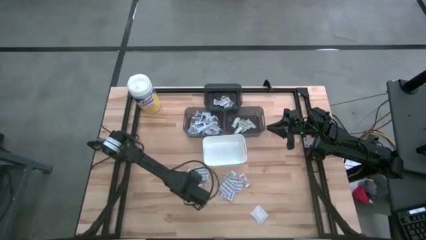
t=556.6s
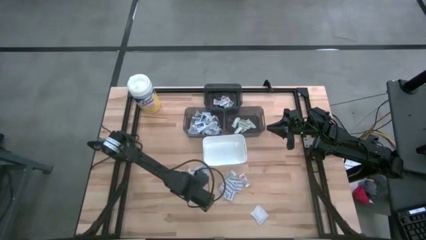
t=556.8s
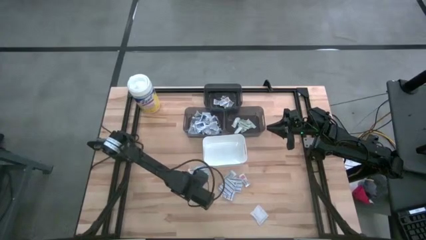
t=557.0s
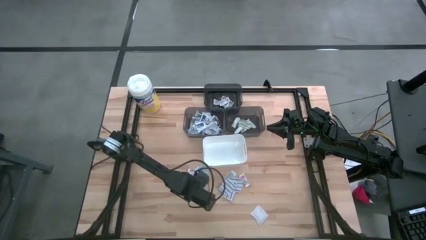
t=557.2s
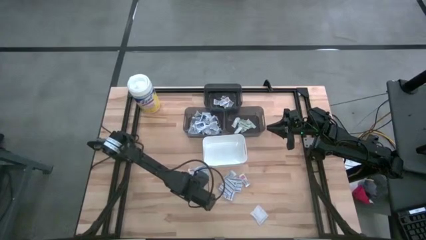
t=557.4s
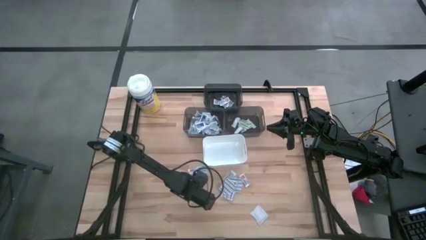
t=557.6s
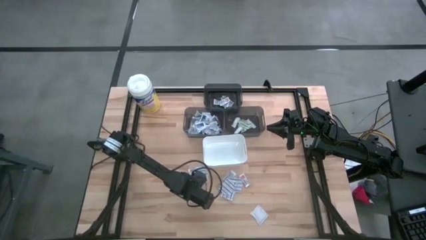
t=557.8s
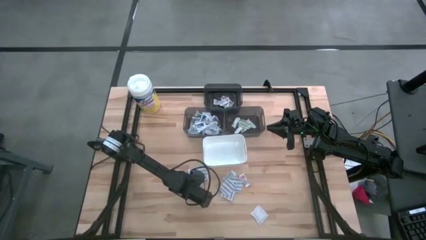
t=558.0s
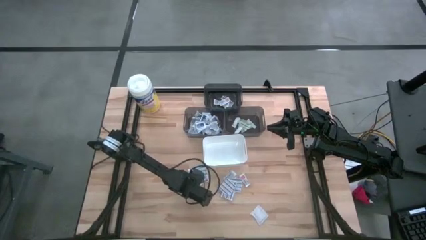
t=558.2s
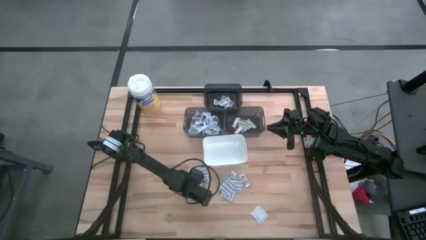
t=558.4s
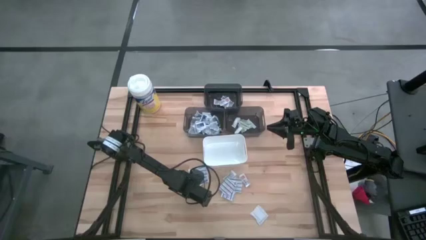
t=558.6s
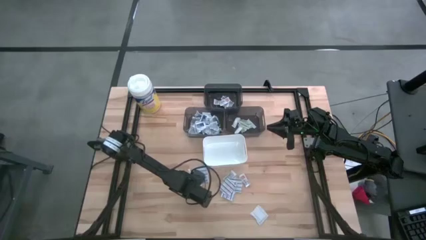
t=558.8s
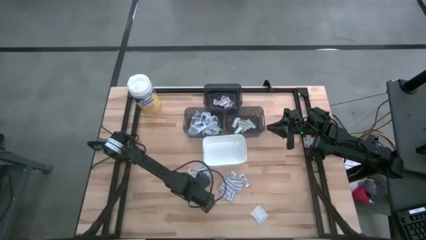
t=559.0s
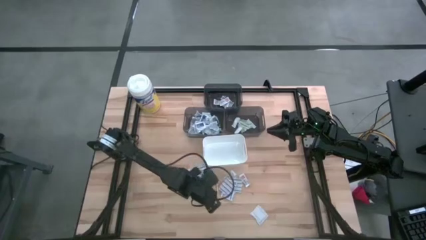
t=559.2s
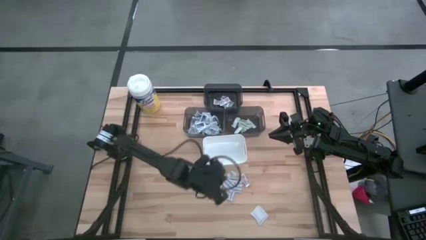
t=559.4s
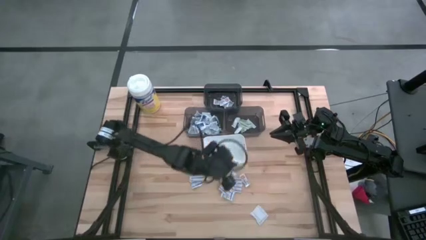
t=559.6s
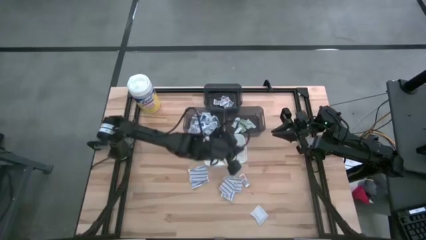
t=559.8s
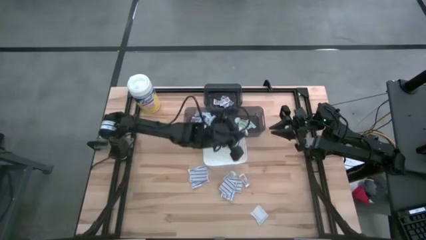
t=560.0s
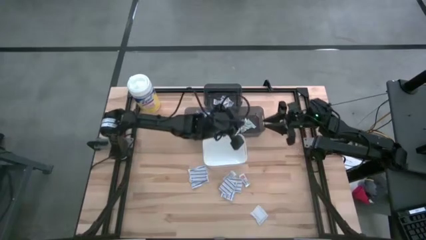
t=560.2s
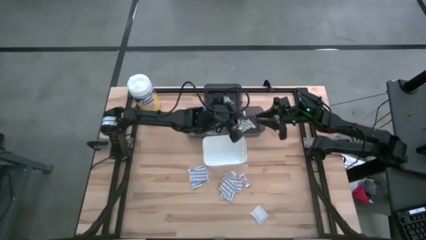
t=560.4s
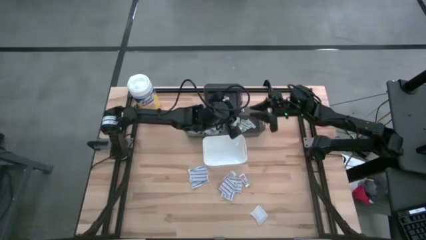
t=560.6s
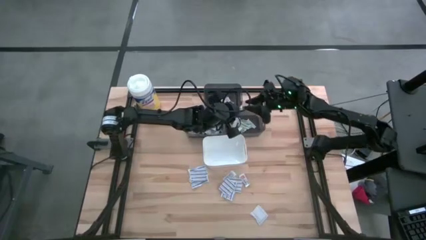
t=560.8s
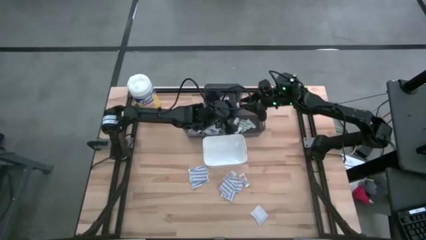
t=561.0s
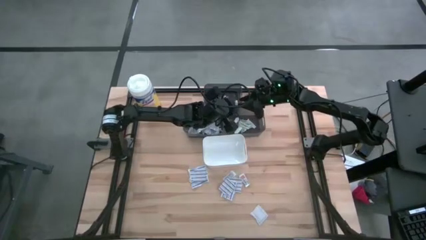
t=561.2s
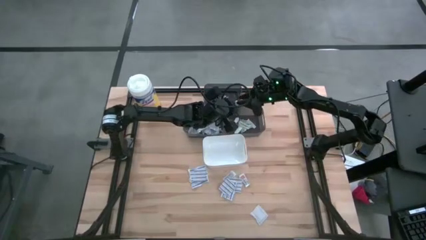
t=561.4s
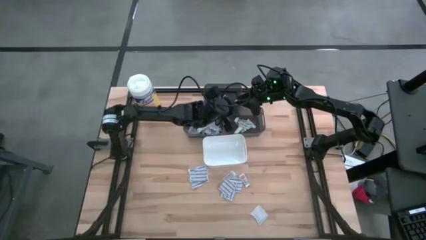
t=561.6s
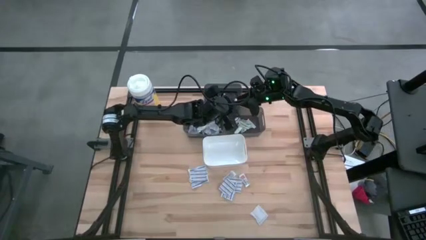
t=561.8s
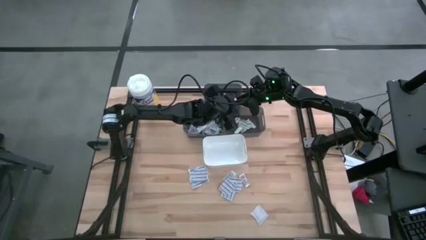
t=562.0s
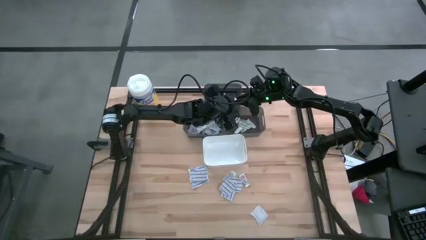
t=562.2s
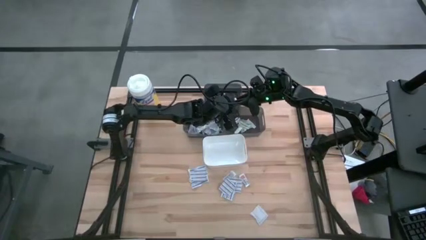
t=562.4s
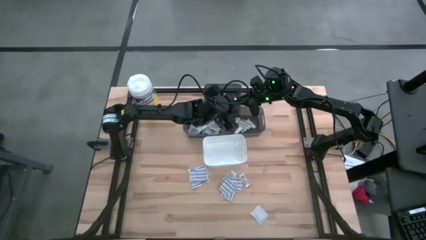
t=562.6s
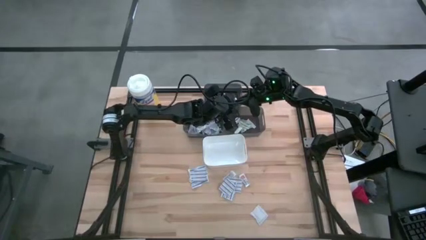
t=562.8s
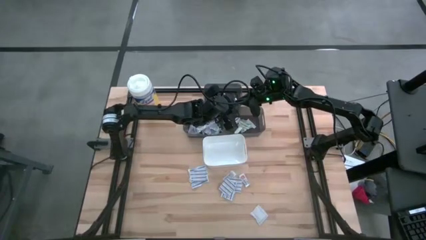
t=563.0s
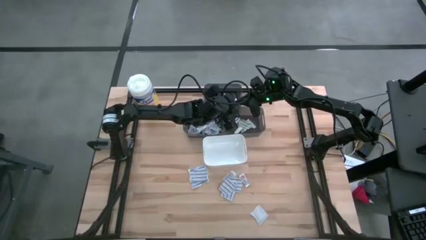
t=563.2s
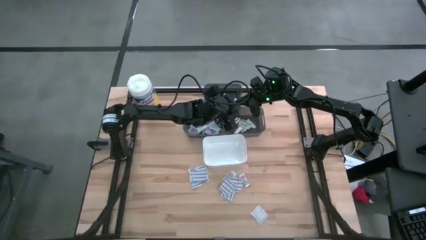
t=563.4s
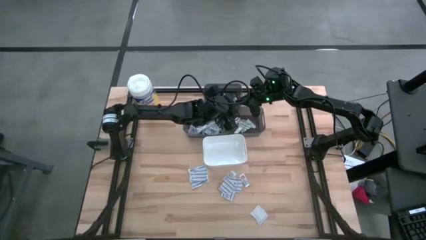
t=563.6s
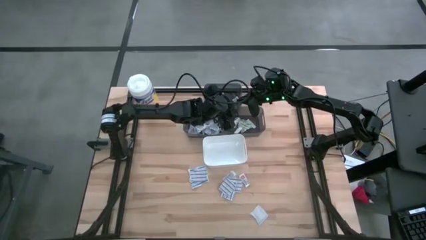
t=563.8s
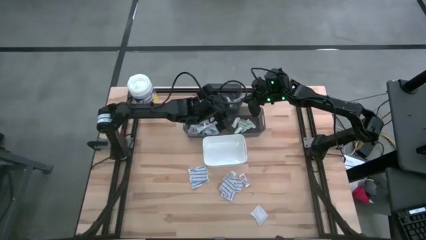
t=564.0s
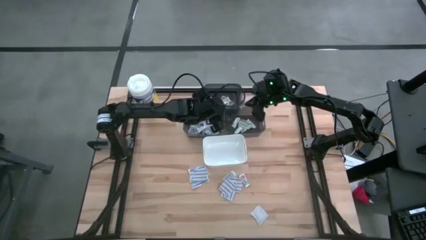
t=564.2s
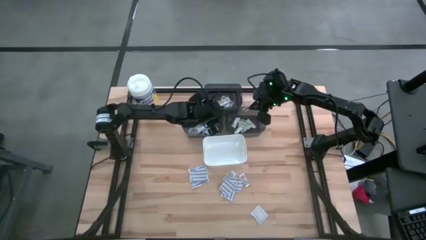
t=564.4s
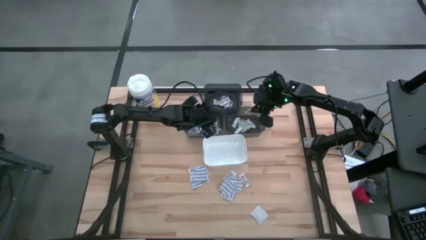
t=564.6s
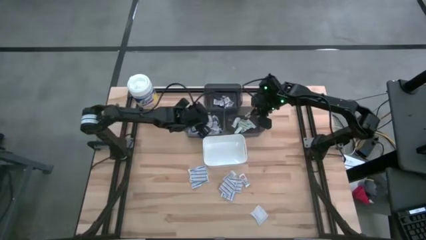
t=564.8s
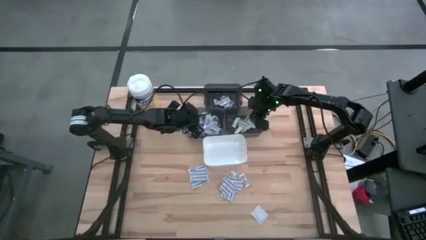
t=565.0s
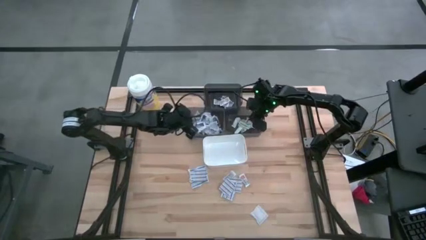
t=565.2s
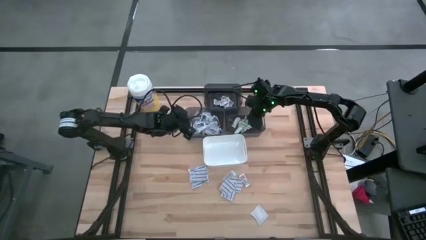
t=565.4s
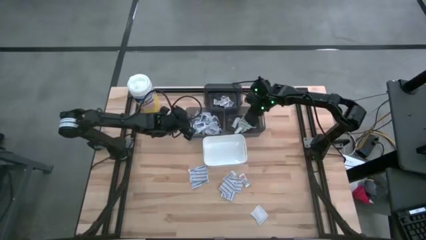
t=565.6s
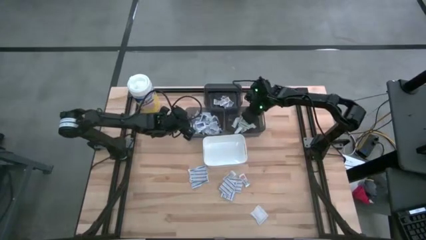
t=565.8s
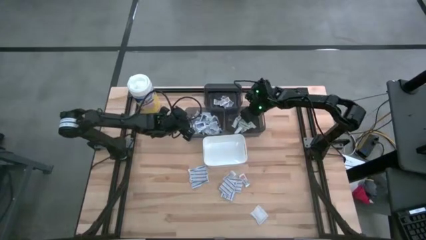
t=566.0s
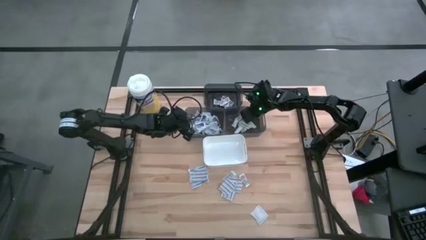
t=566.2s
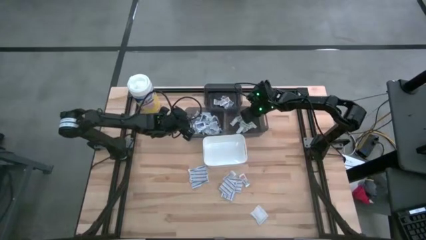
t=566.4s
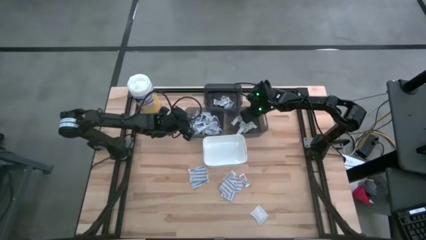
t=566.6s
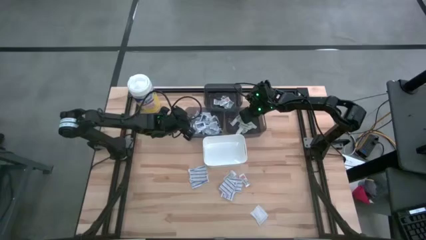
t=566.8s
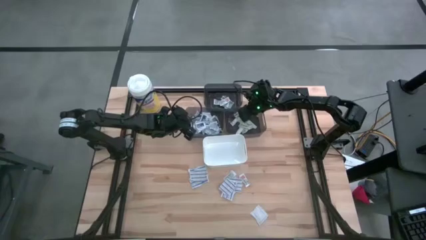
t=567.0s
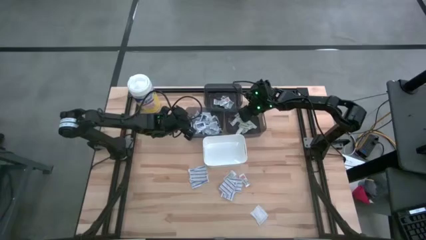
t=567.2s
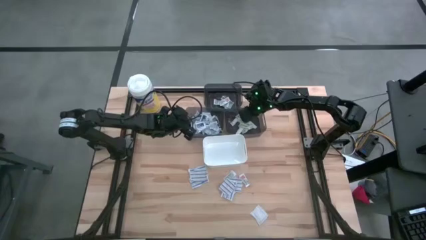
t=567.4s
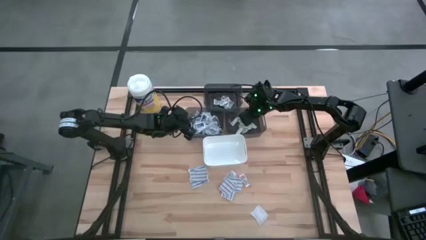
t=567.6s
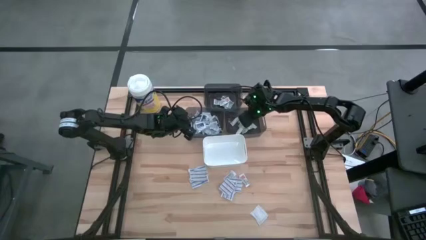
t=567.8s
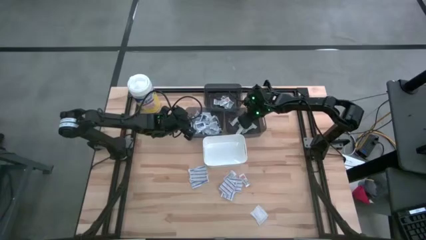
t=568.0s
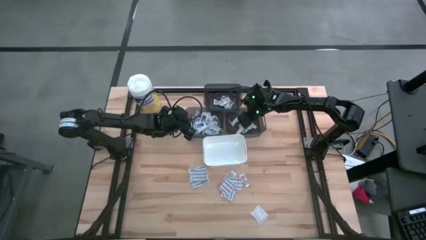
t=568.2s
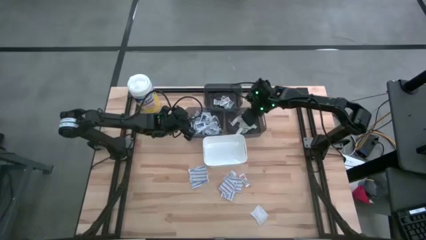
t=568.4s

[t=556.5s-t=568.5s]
Task: Pick & Place First Aid Supplies
Put the green bandage into the bottom right black bin

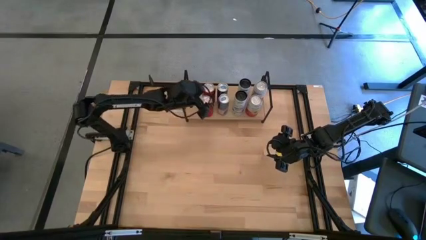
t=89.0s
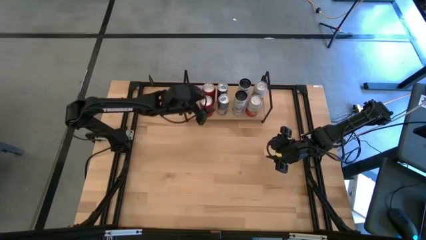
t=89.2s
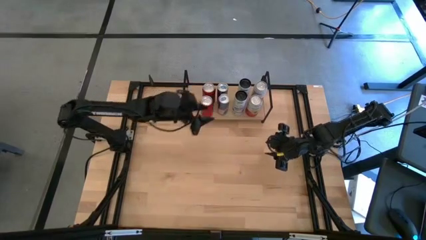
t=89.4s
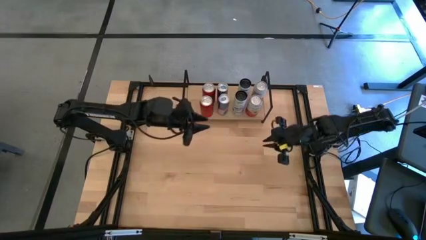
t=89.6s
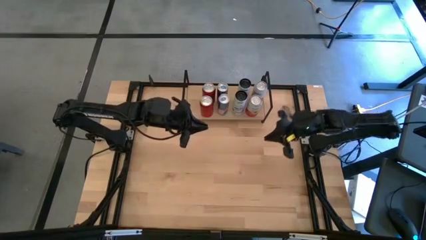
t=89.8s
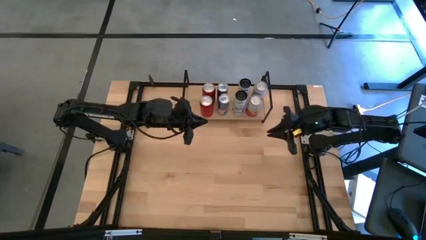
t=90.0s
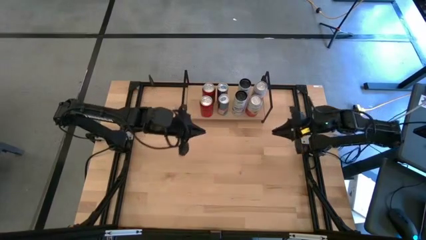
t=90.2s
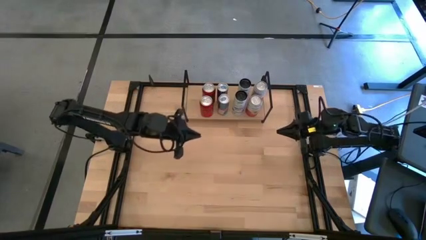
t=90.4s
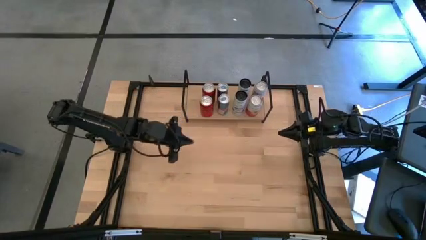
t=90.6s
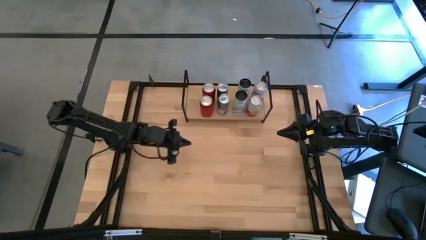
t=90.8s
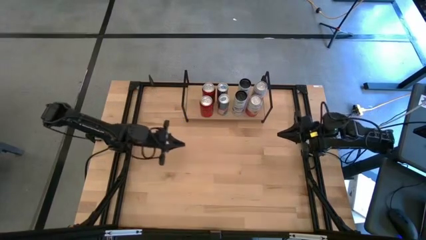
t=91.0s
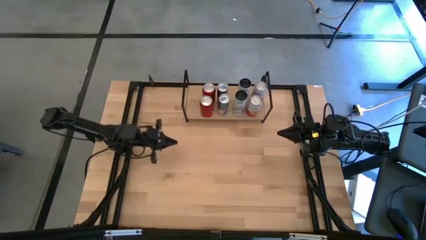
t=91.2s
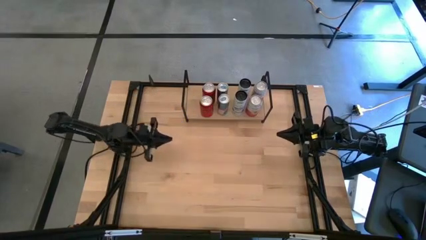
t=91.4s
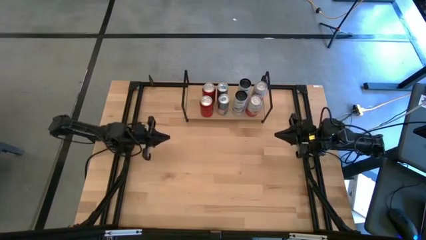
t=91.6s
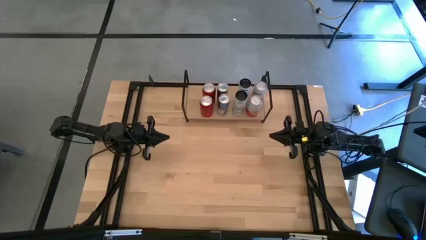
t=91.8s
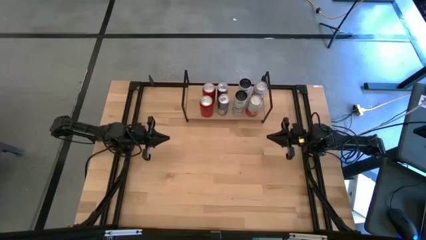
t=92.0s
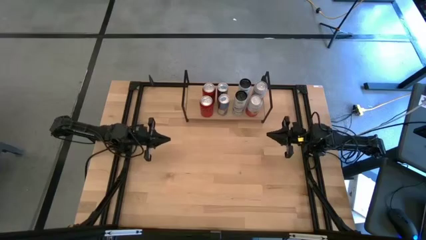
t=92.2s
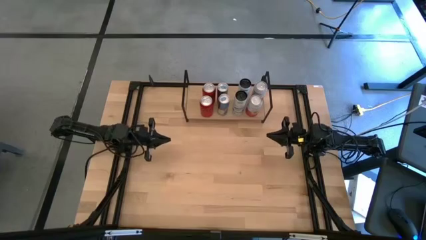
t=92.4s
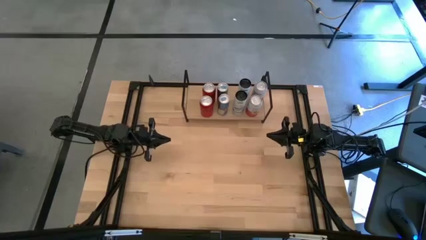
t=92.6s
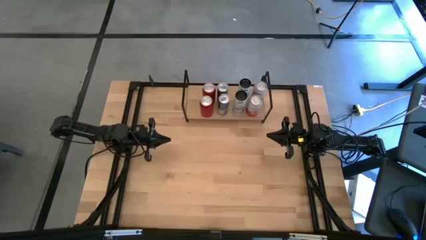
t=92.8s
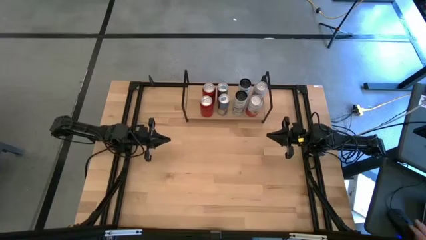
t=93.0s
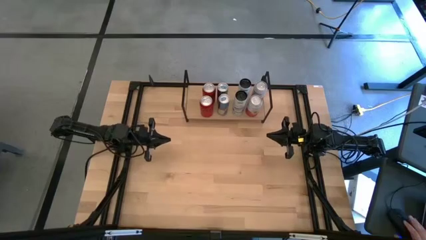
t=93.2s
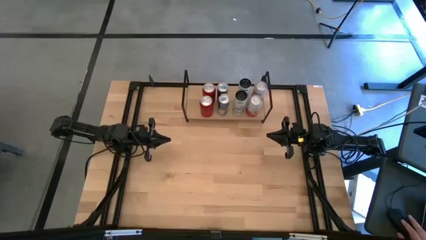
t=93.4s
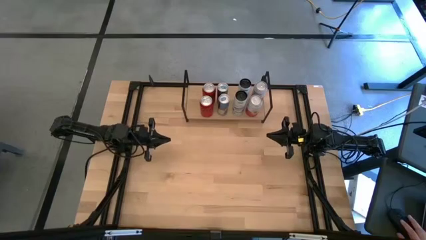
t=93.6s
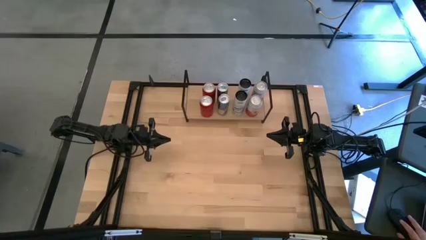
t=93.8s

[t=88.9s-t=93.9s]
Task: Place canned beverage on shelf
Return to Home Position
